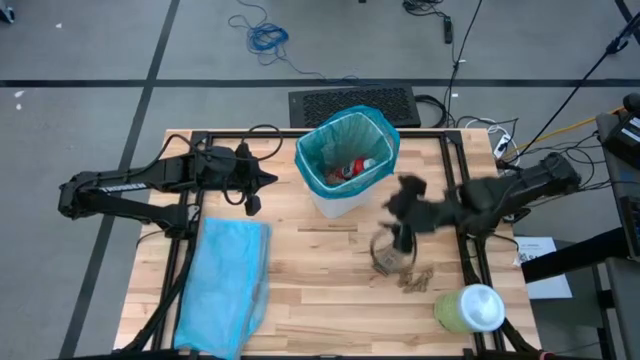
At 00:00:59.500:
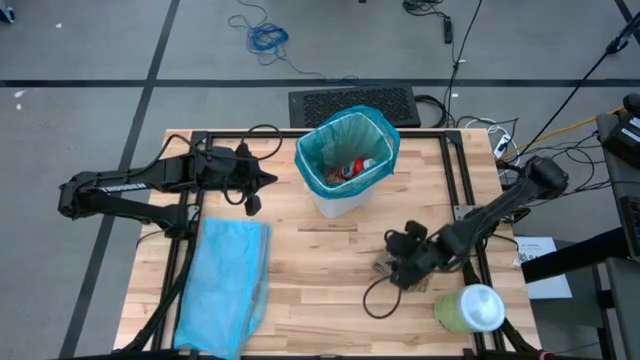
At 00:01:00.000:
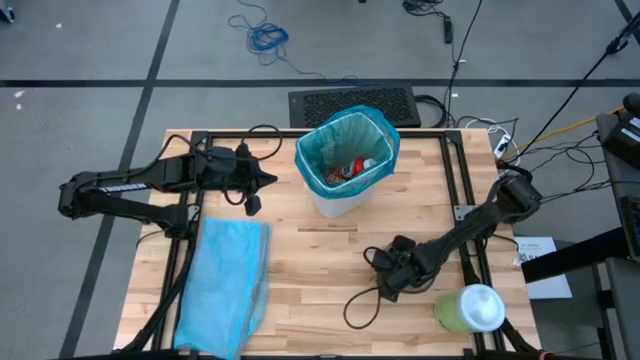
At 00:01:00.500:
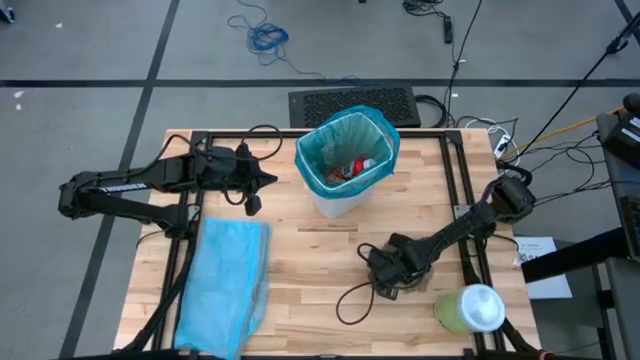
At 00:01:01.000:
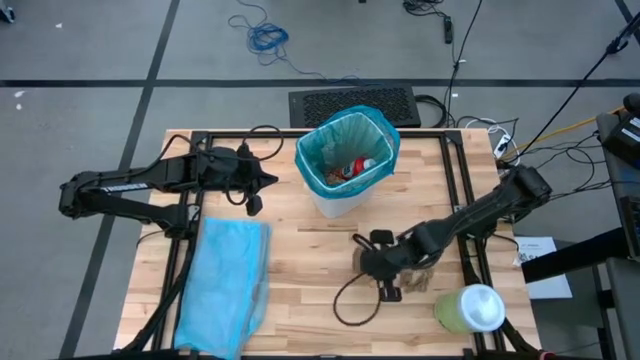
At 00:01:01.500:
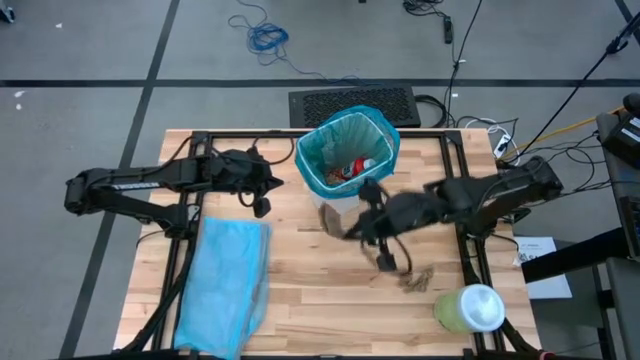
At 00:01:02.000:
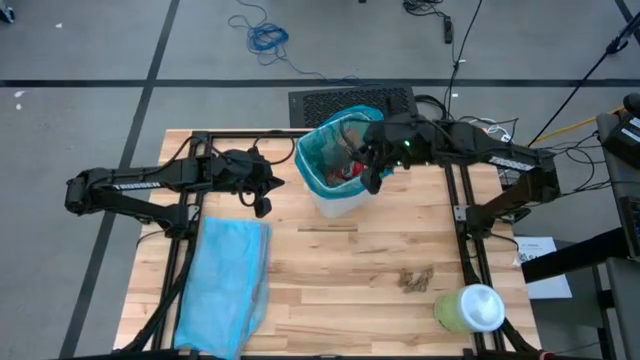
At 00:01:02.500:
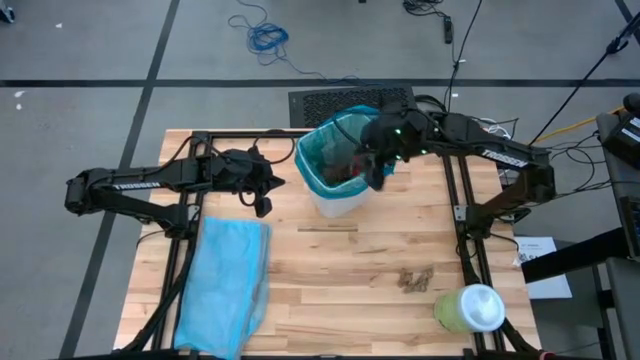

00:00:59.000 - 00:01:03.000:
Task: place trash/remove bag and relplace
Put brown paper into the trash bin

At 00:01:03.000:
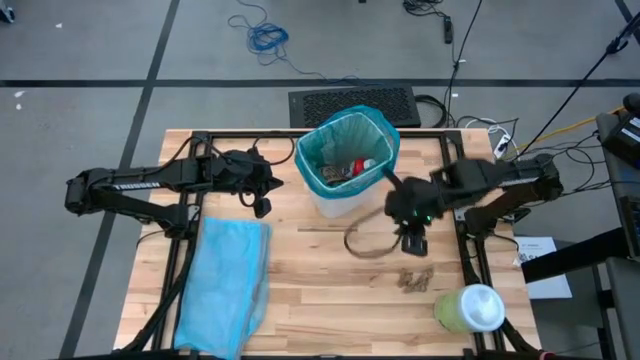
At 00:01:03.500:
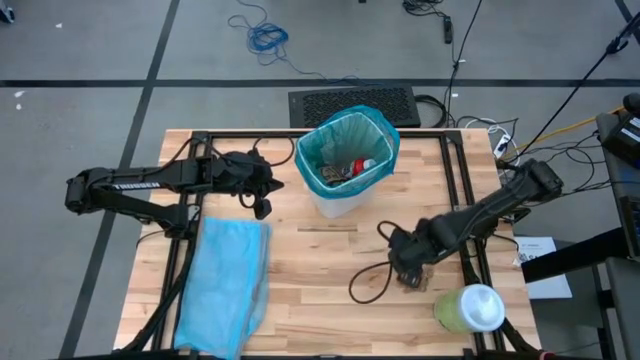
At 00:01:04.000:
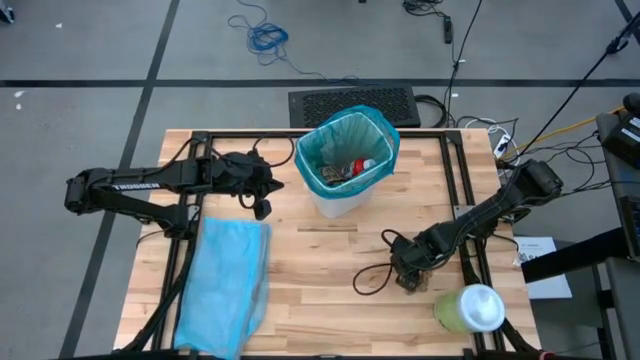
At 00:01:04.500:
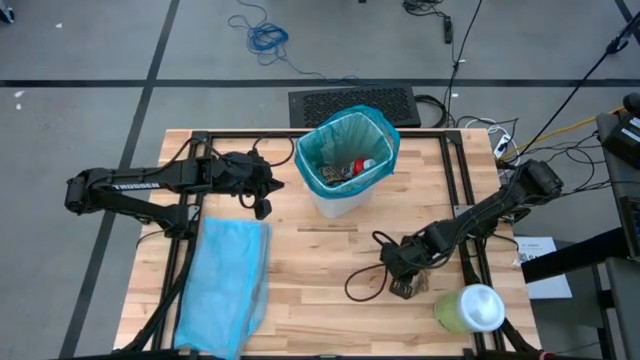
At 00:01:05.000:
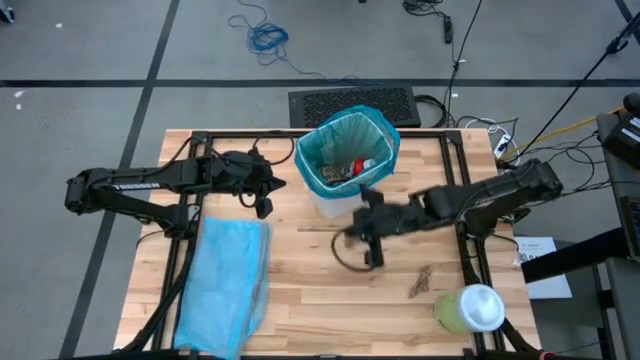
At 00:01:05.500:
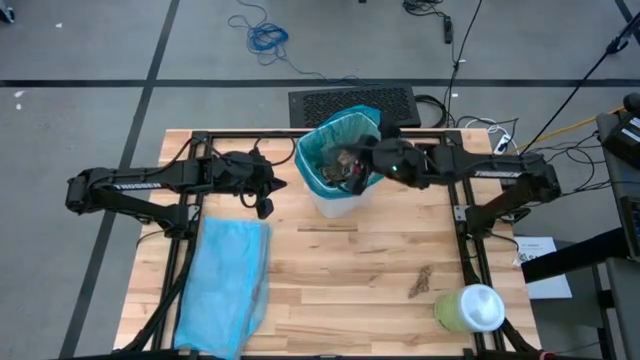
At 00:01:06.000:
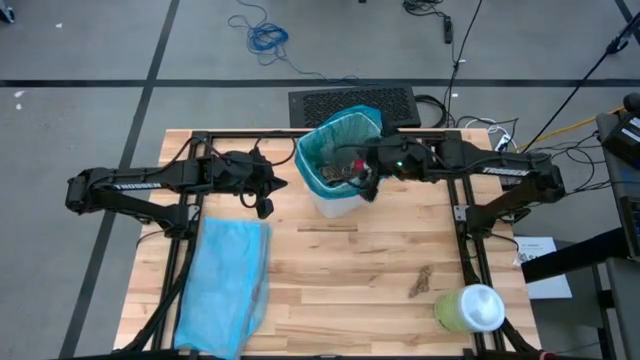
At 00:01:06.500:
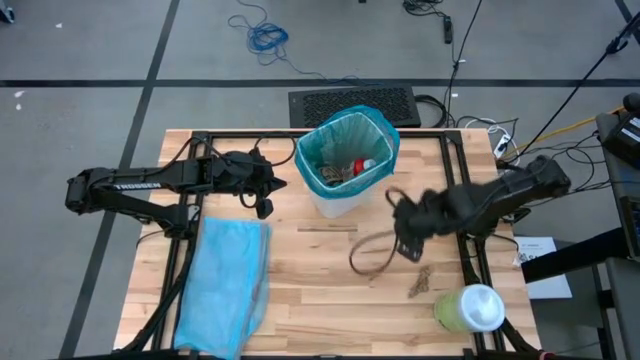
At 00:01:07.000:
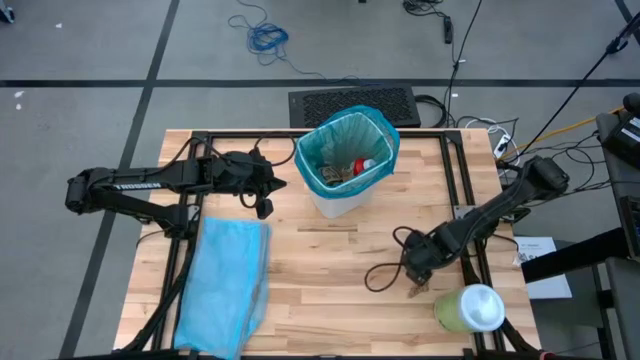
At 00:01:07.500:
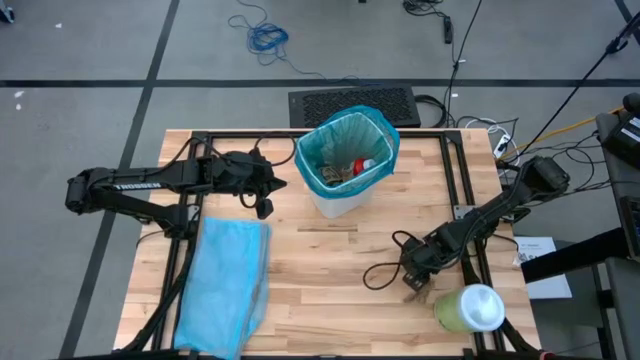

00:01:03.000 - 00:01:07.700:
Put the brown napkin into the trash bin

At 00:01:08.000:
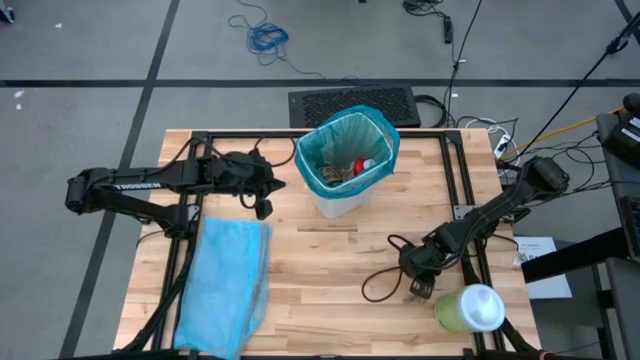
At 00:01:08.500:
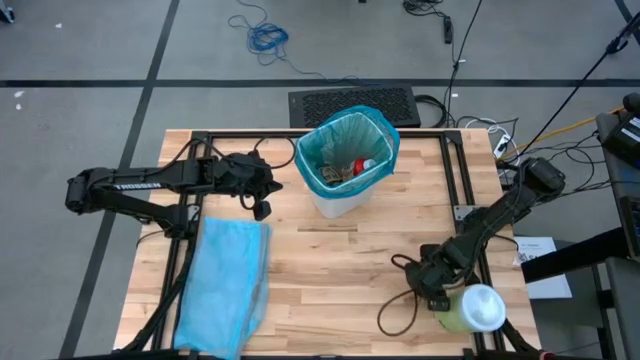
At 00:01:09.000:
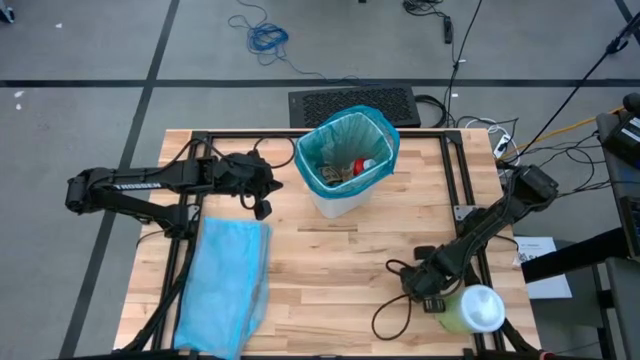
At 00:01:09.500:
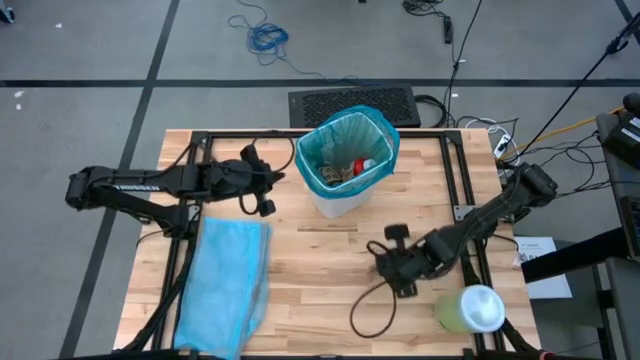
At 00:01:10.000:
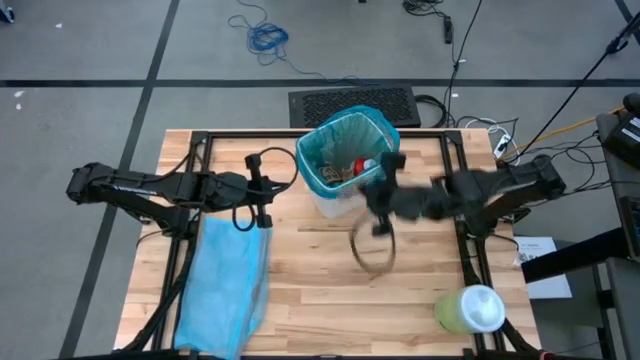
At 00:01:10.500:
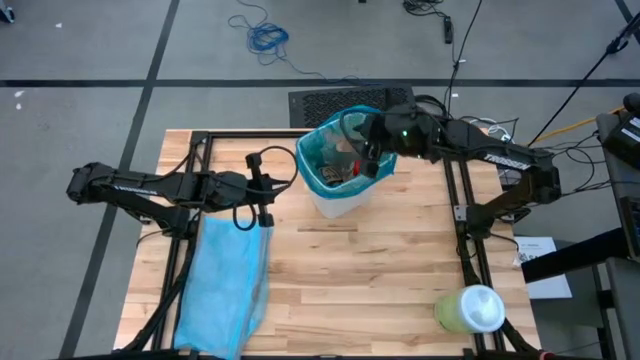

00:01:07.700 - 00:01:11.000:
Put the brown napkin into the trash bin

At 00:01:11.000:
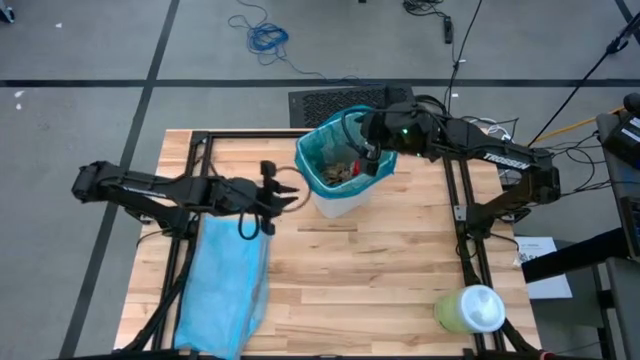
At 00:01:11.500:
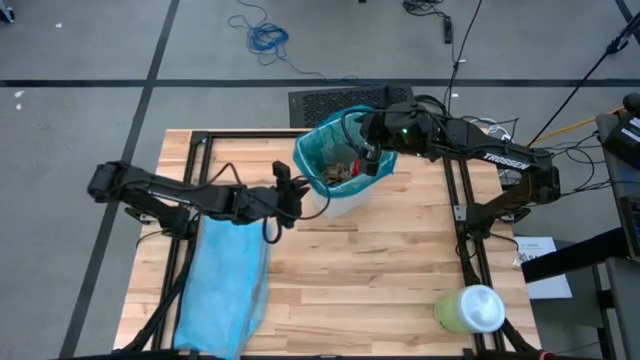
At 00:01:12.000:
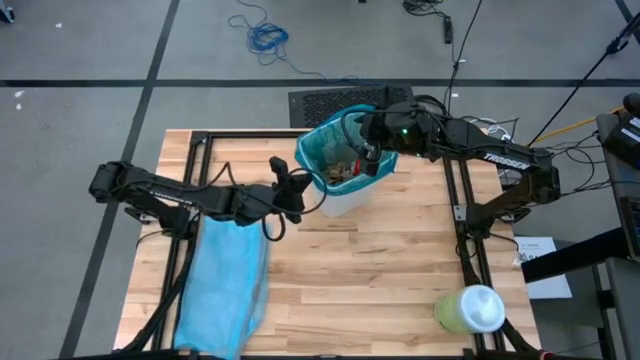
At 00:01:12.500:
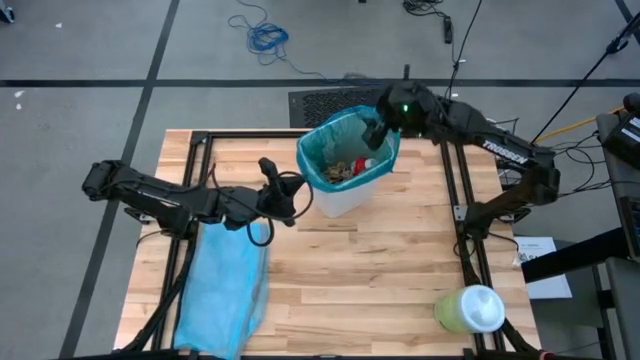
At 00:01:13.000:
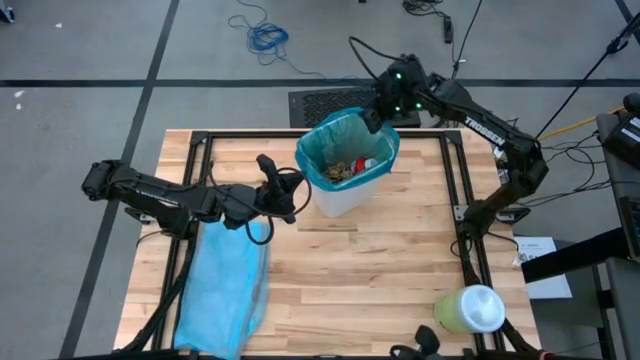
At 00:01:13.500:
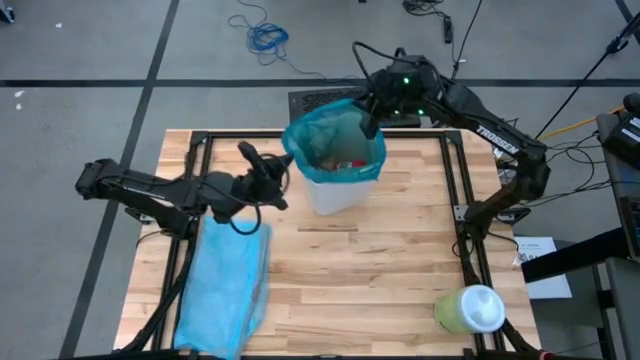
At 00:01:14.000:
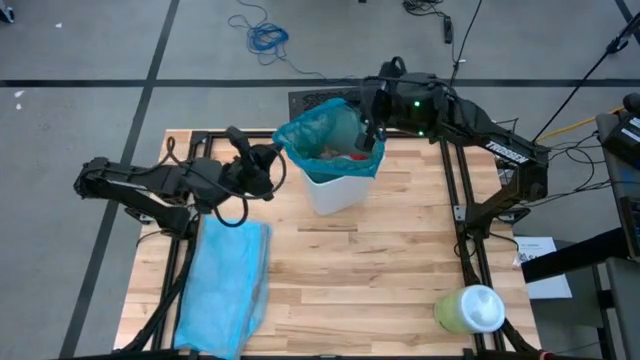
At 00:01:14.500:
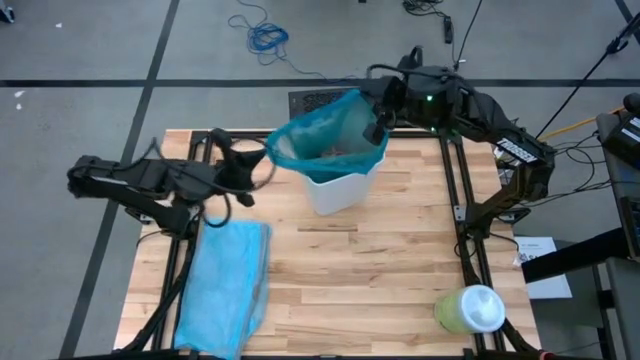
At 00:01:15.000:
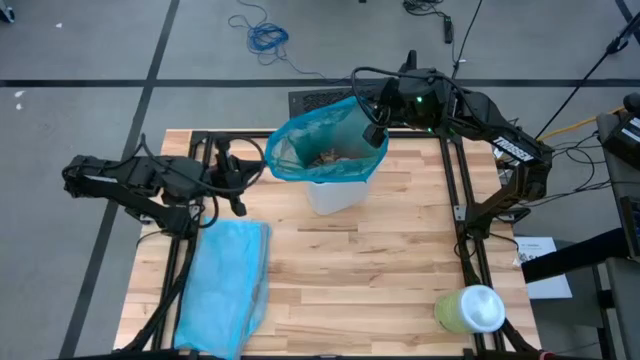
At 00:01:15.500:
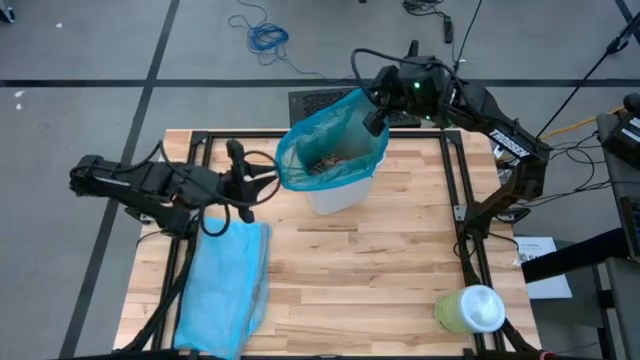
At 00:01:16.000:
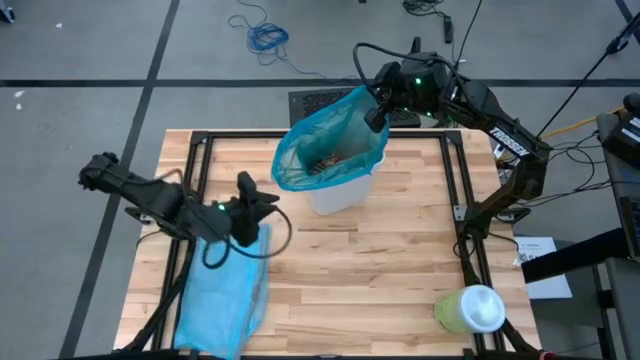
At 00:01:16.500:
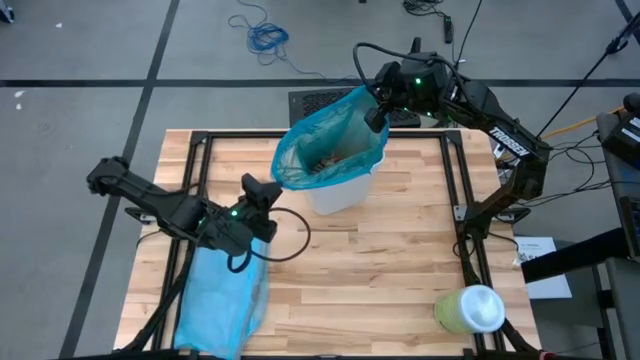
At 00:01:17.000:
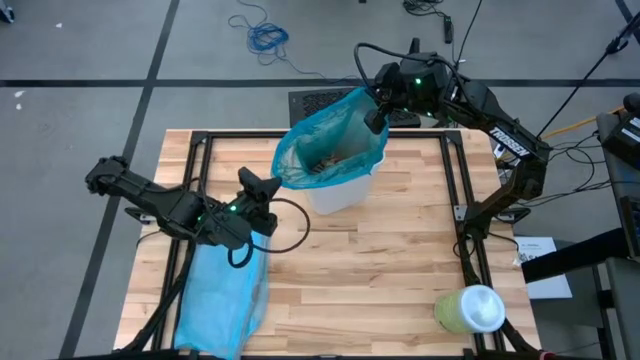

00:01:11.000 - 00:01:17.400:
Close the trash bag

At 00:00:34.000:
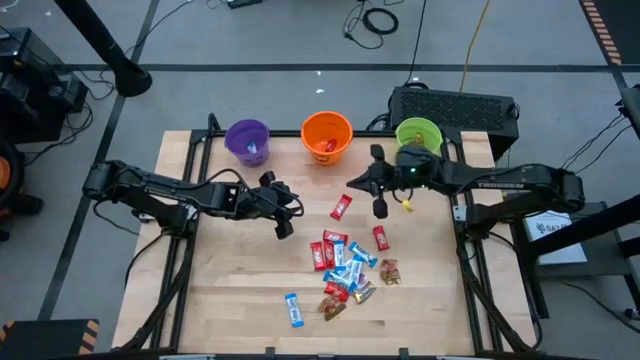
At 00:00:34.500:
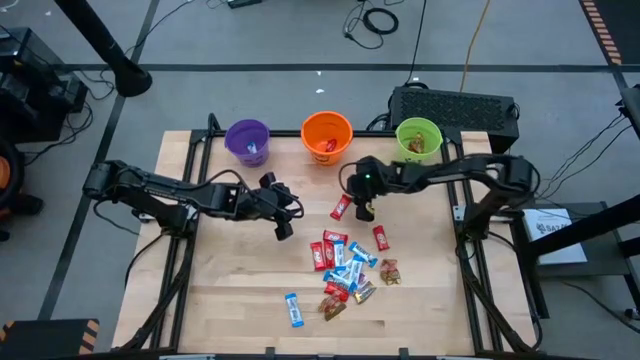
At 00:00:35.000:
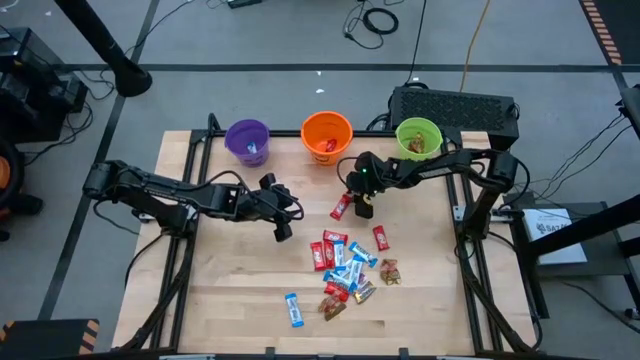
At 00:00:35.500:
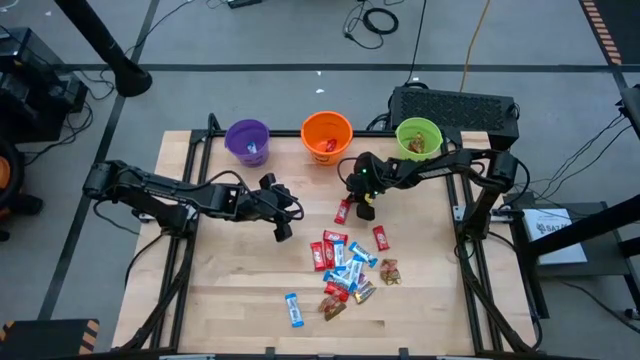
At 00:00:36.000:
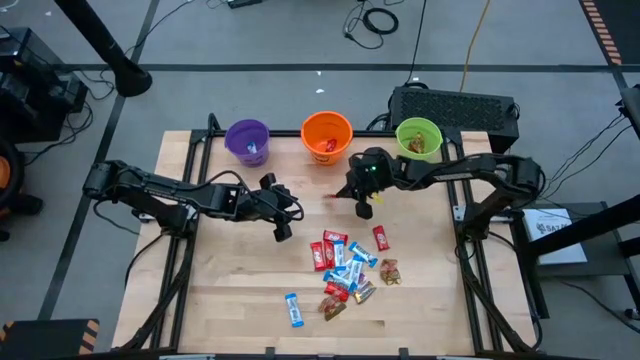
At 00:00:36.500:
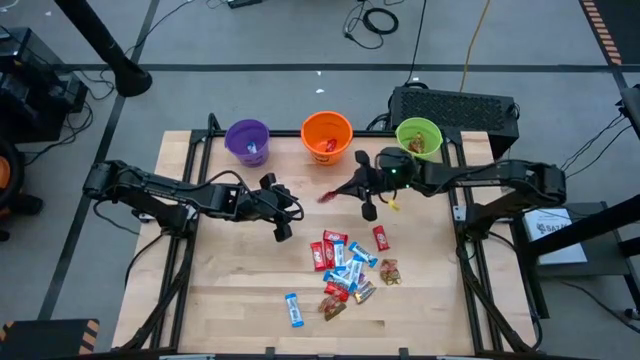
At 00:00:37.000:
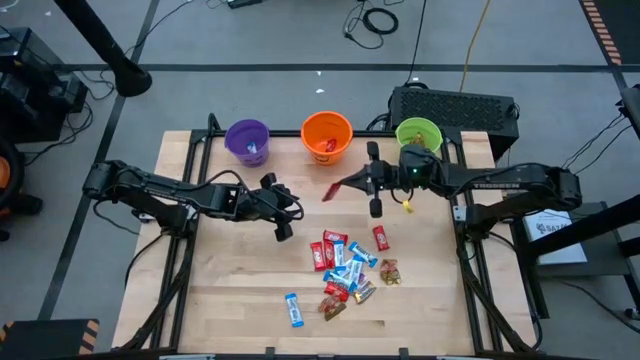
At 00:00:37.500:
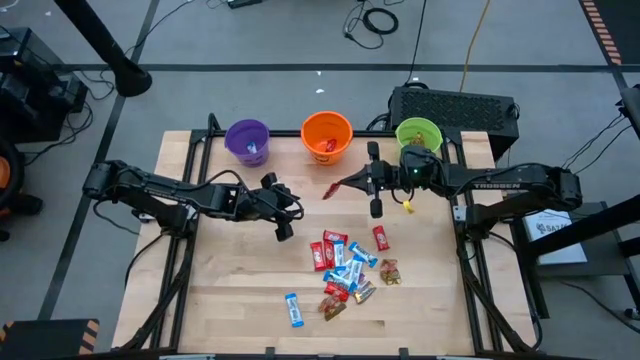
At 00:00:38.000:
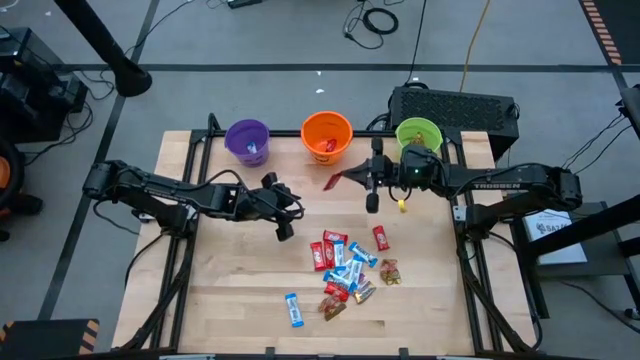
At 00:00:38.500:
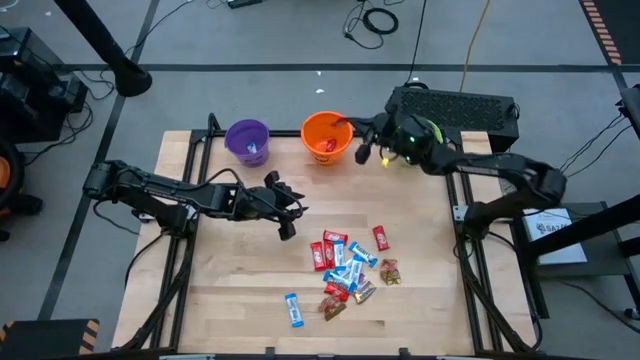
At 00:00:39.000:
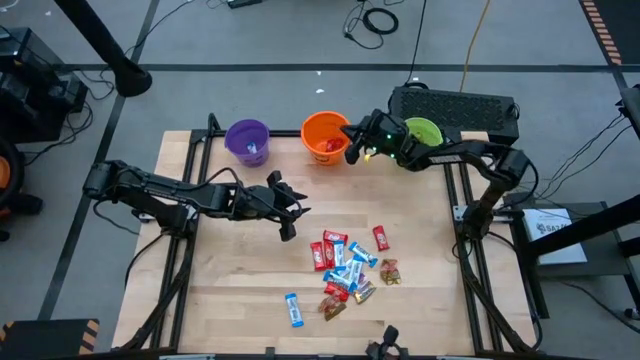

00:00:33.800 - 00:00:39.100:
Task: Sort candy by brand, put in halloween buckets
Put the red chocolate into the orange bucket
